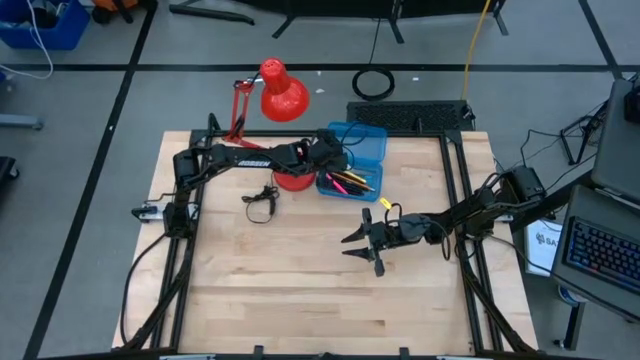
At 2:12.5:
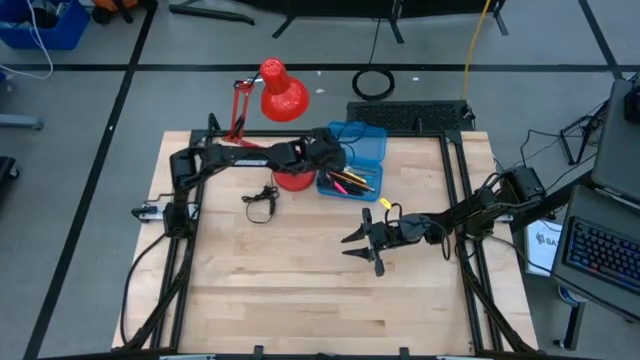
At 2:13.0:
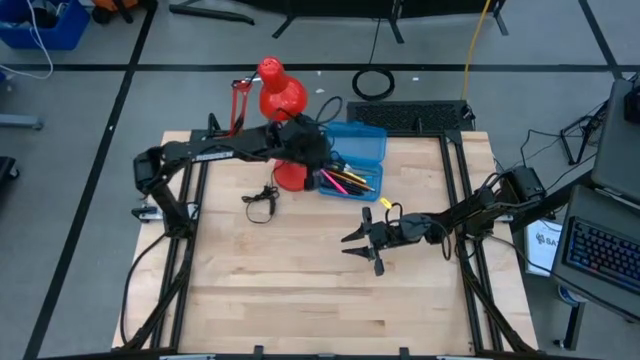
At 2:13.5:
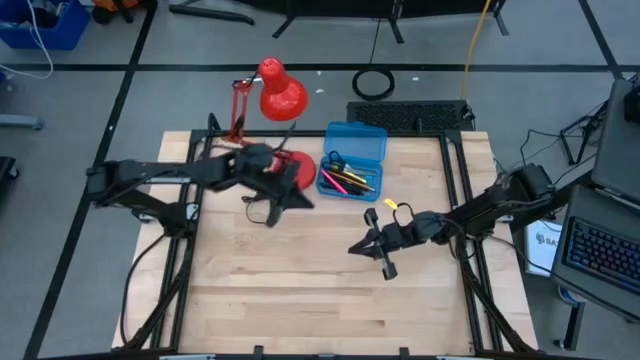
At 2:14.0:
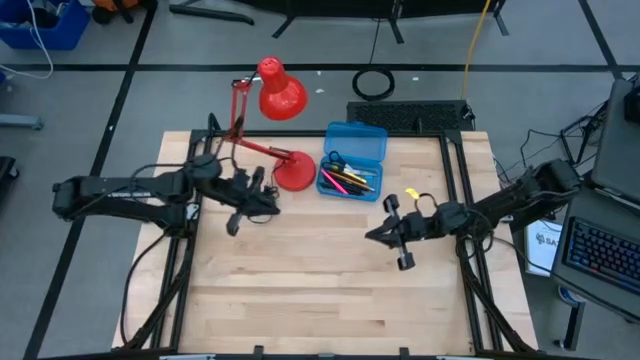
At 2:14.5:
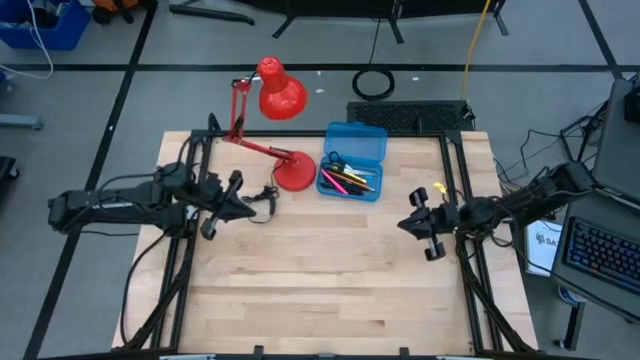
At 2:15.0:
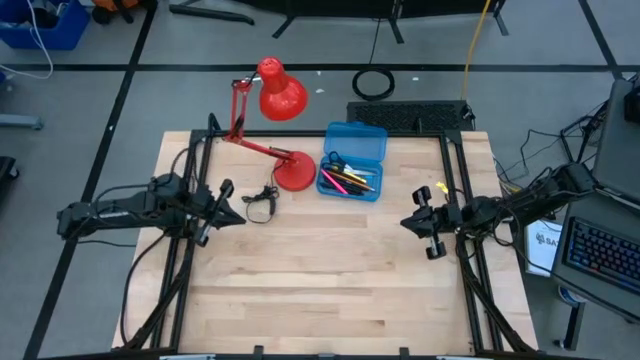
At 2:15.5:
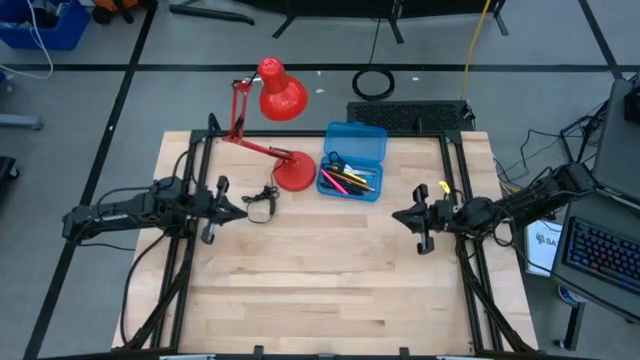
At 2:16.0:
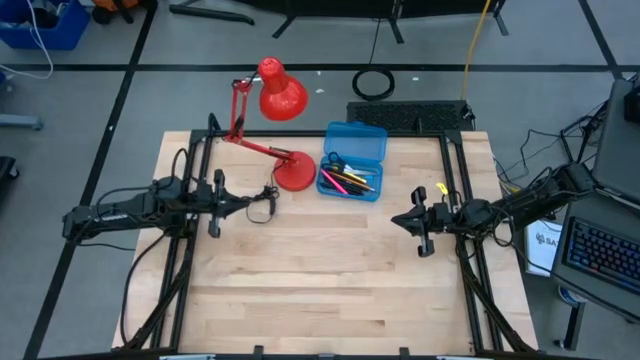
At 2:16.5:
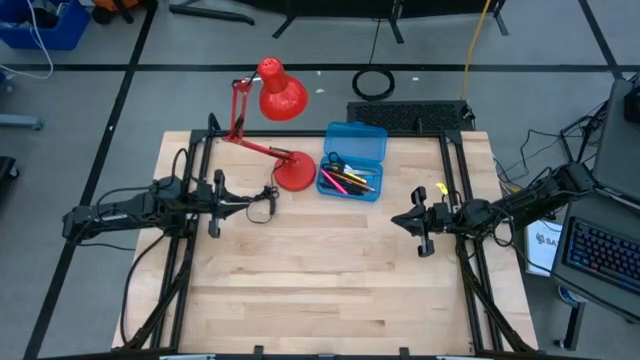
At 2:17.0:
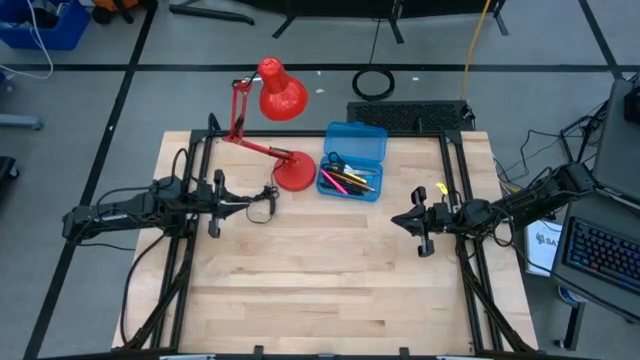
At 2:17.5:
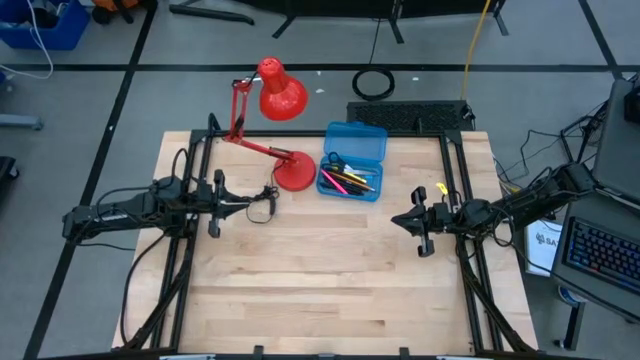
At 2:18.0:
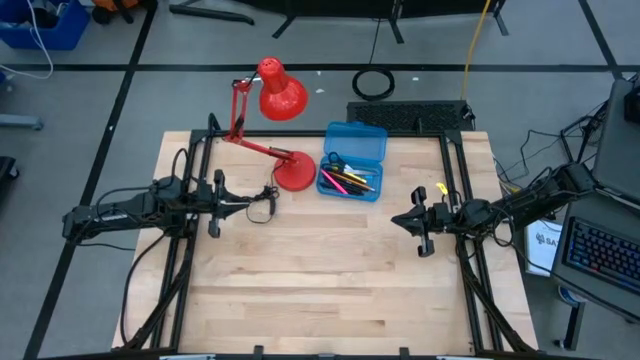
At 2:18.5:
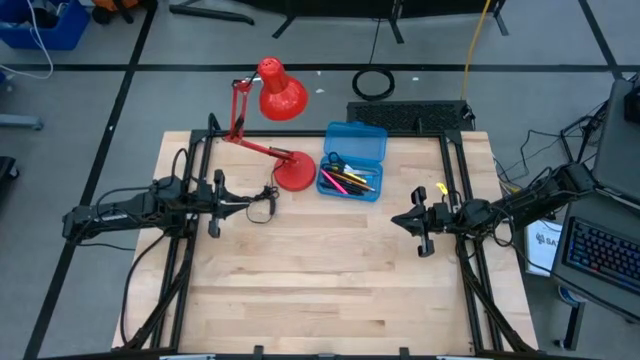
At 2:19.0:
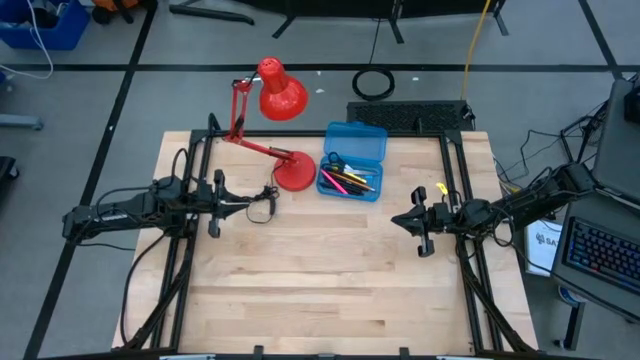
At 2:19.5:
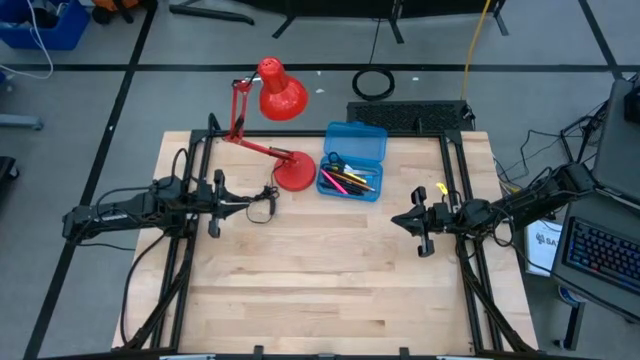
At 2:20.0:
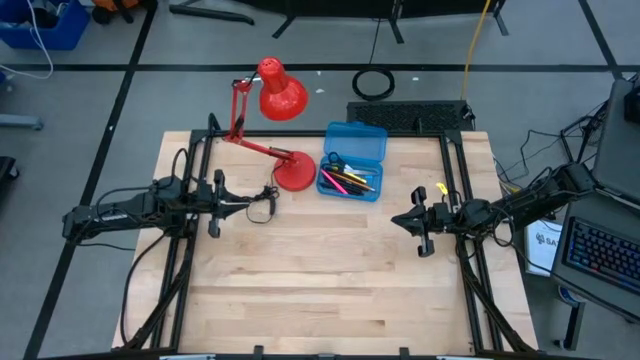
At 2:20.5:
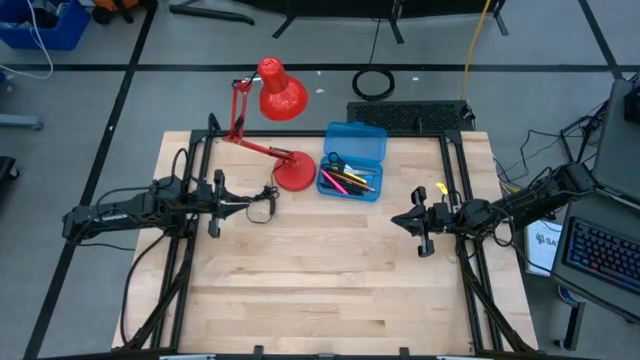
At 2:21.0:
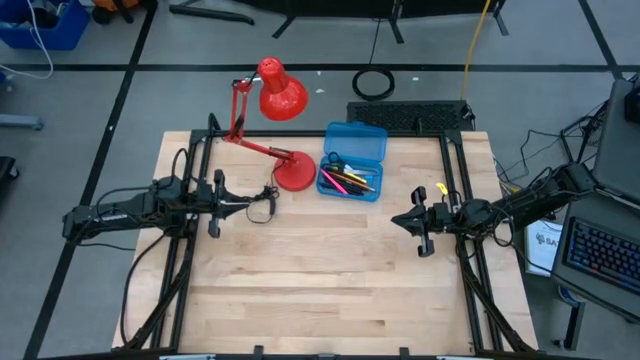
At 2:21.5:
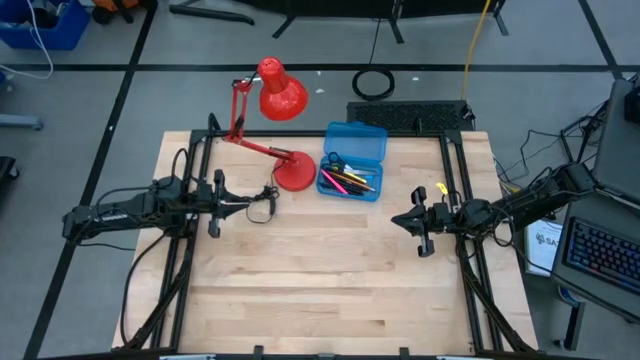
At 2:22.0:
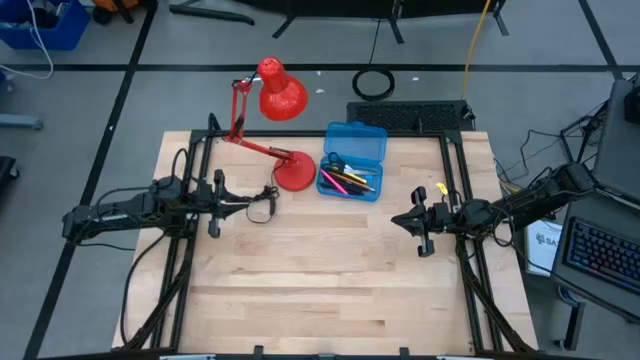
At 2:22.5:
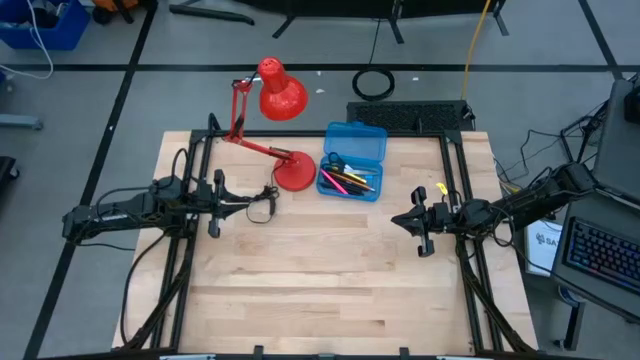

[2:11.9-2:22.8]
Task: Pick & place school supplies into a supply box
Return to Home Position

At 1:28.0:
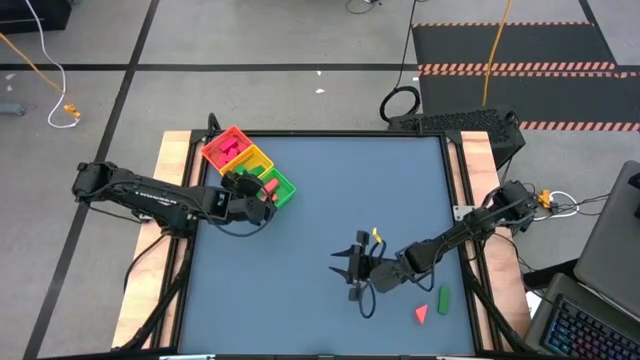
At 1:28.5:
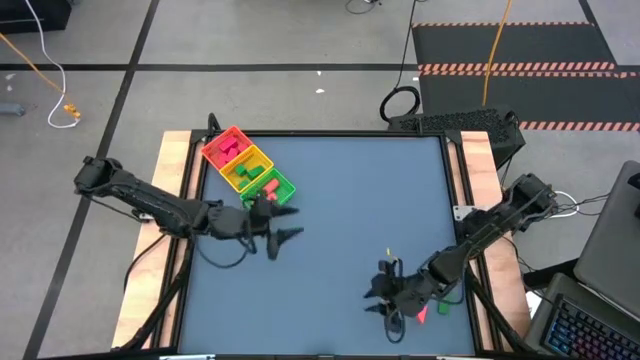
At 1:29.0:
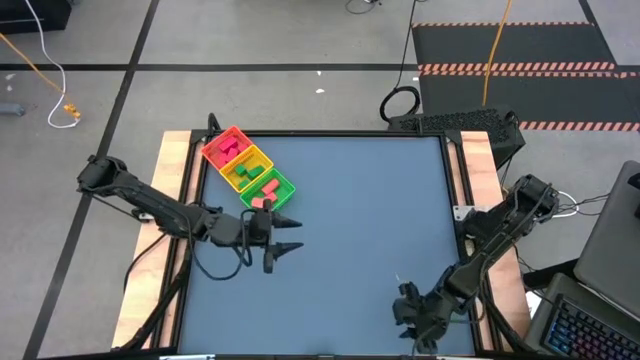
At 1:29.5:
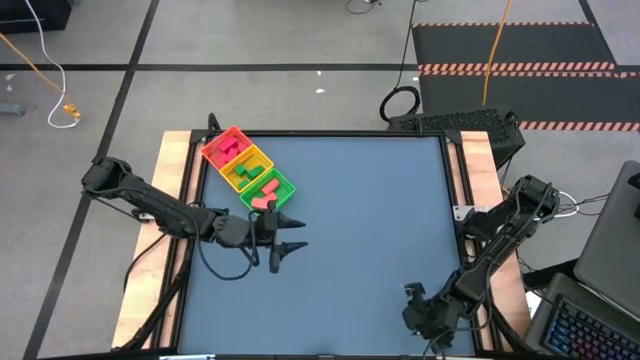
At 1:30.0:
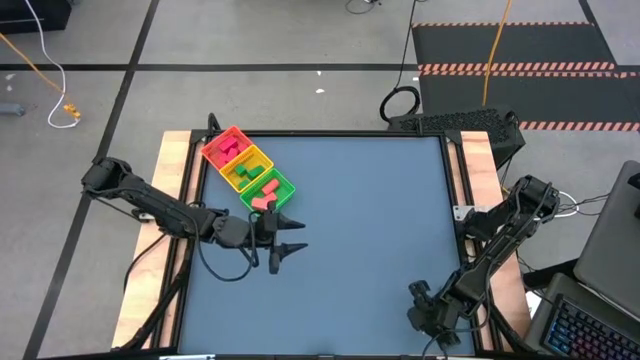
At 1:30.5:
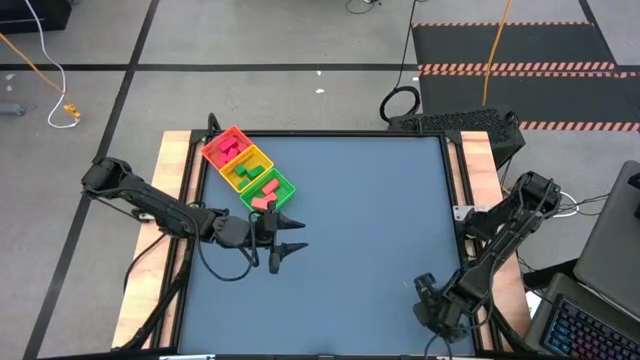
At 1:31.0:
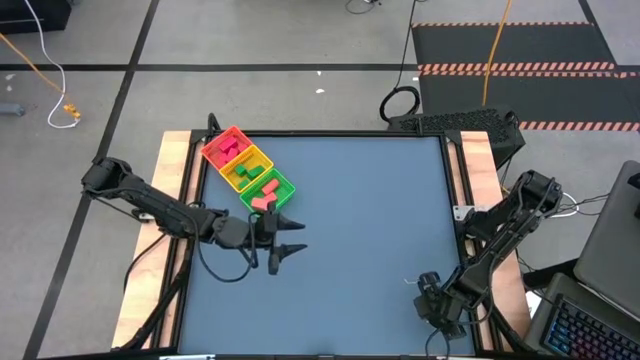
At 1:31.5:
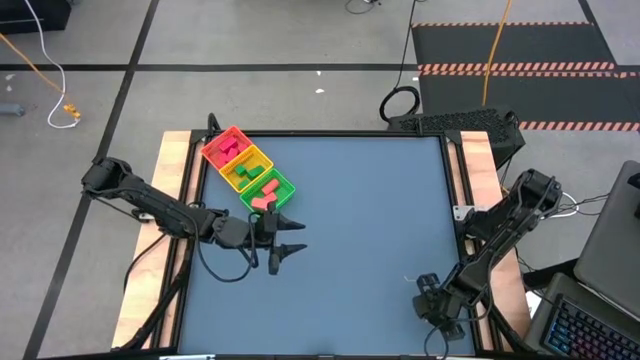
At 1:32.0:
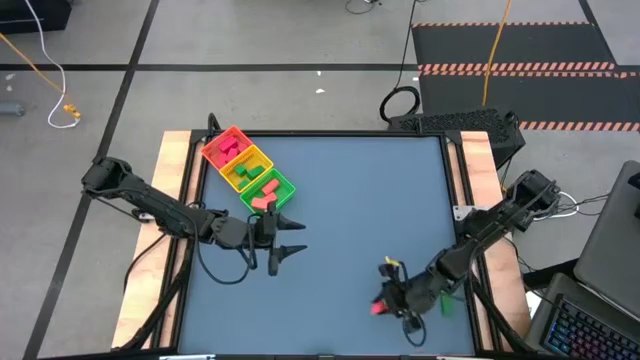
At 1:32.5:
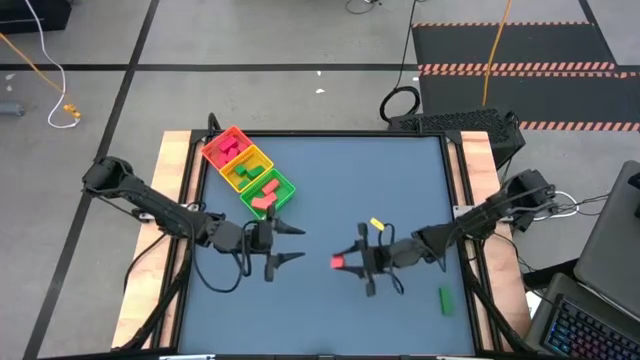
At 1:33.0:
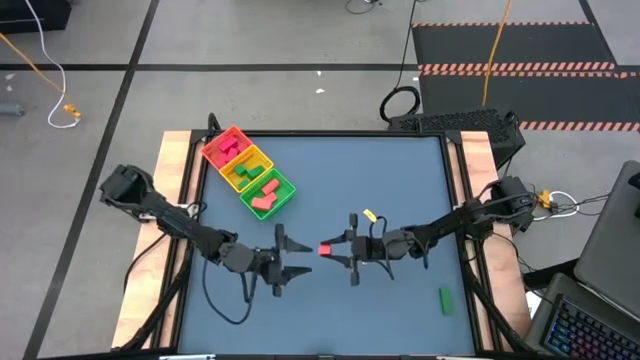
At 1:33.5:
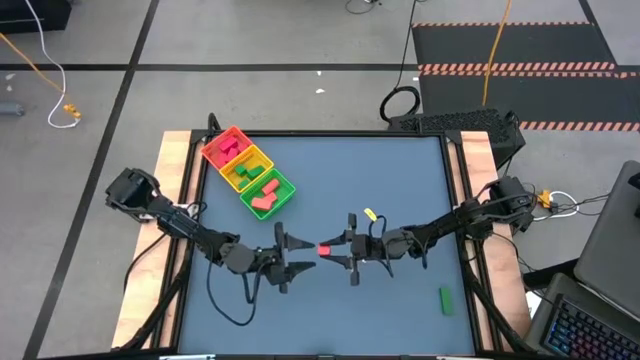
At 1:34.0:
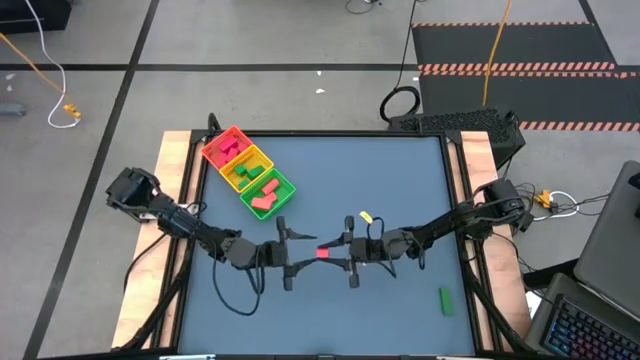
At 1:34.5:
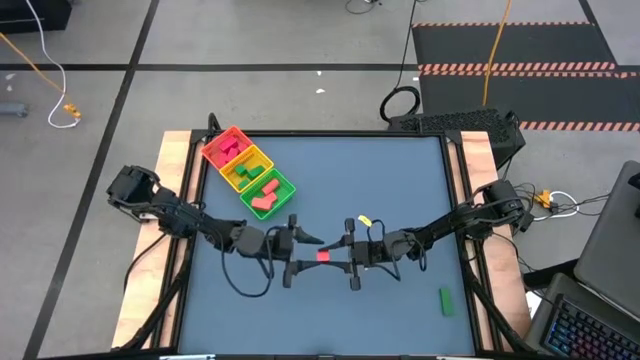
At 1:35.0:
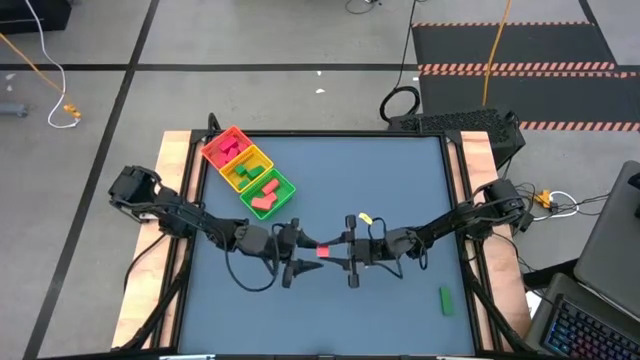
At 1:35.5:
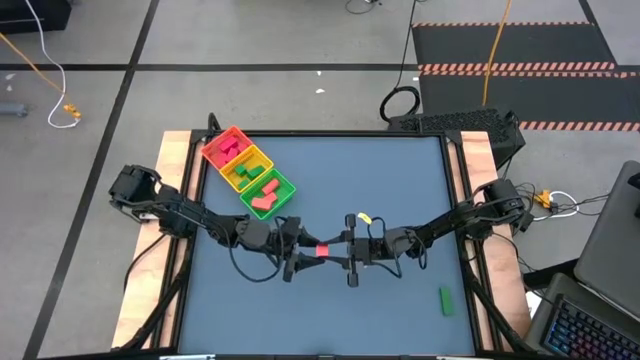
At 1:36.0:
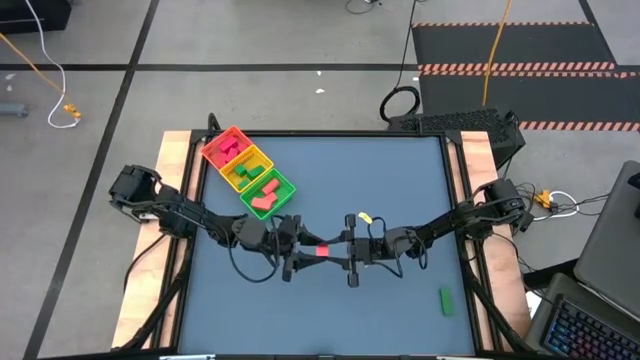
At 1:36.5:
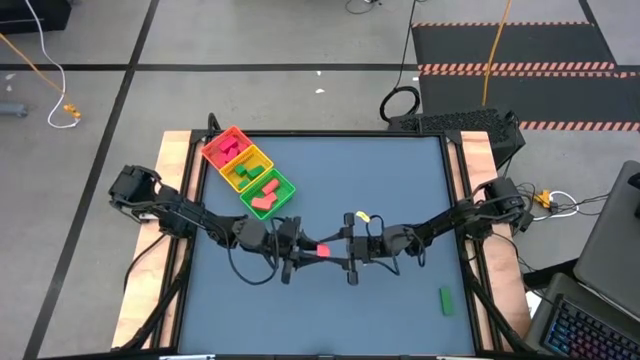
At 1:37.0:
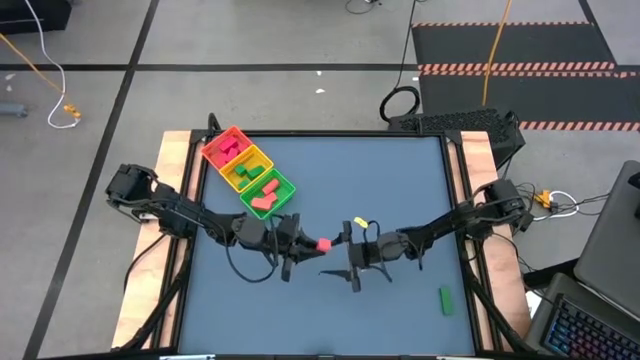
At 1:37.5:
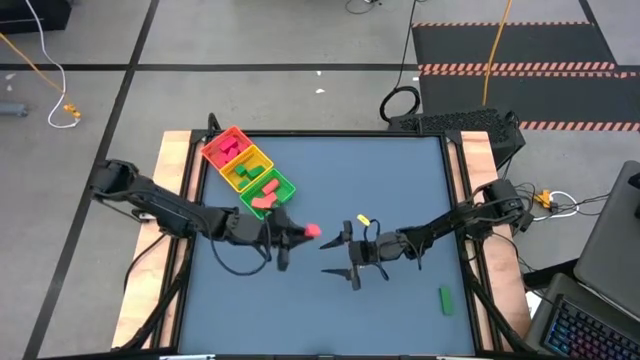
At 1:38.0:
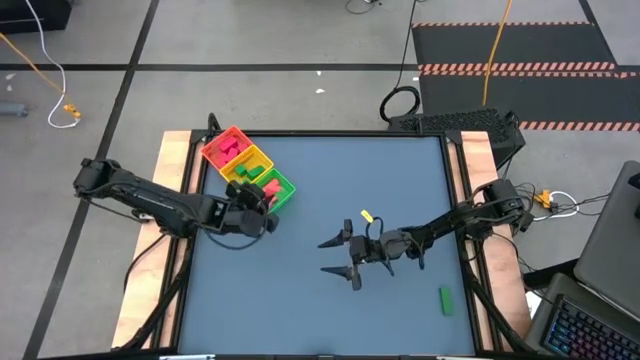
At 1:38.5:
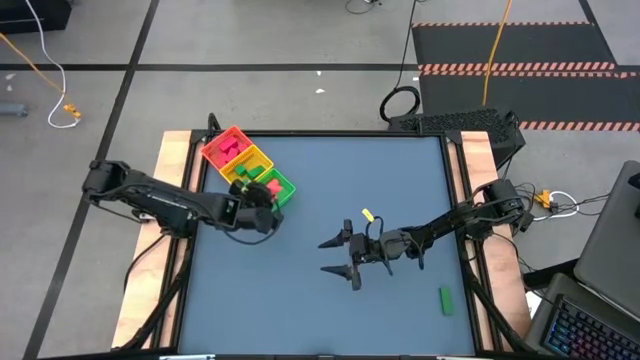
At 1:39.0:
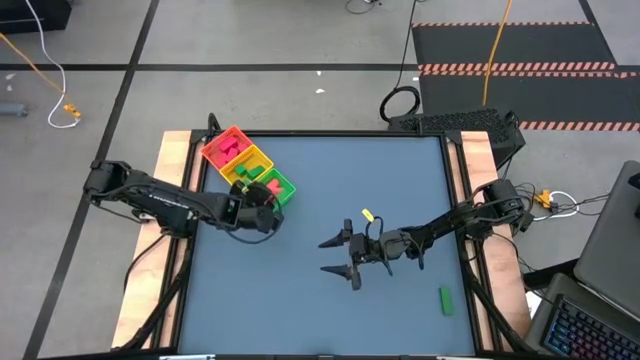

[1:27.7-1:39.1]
Task: Sort & place blocks by color
Put the red block into the green basket
